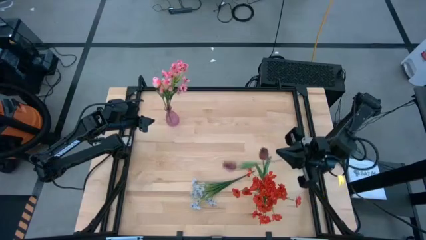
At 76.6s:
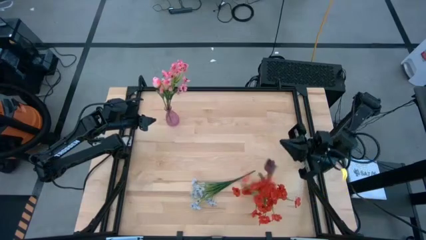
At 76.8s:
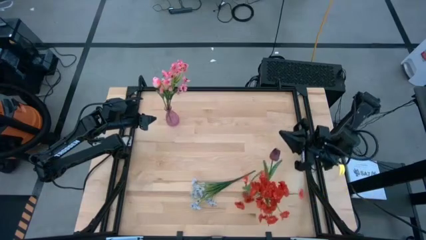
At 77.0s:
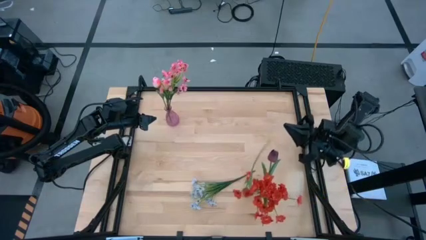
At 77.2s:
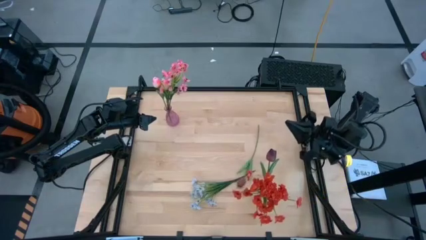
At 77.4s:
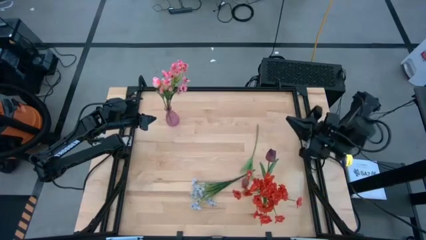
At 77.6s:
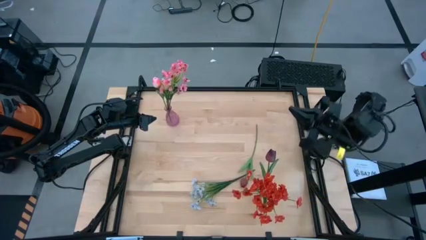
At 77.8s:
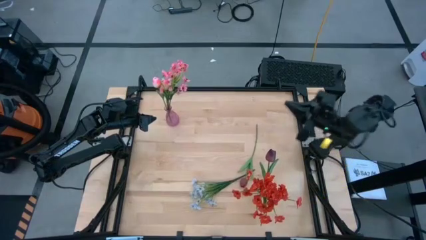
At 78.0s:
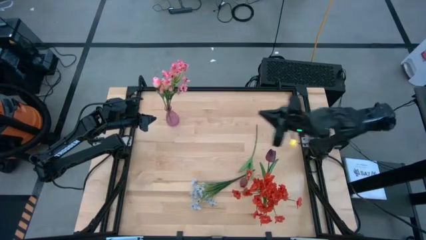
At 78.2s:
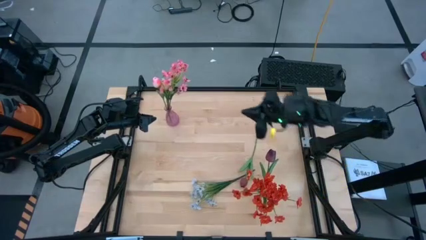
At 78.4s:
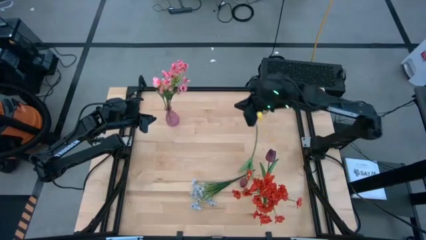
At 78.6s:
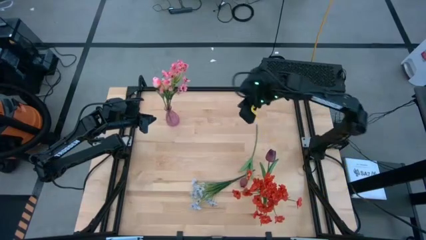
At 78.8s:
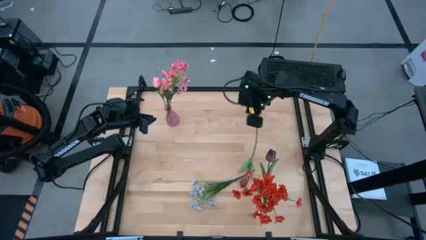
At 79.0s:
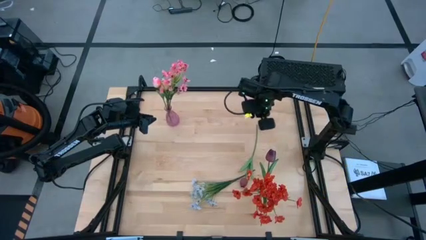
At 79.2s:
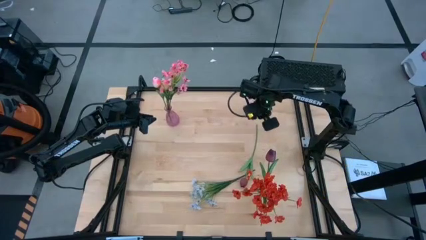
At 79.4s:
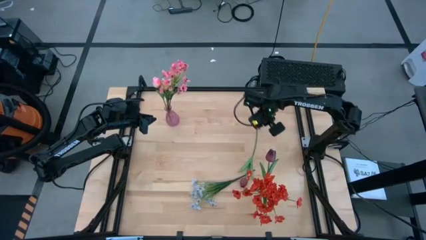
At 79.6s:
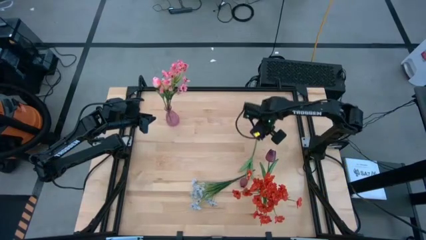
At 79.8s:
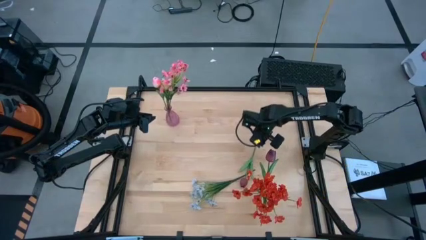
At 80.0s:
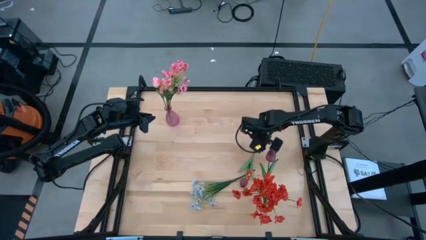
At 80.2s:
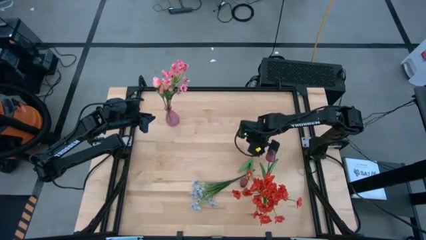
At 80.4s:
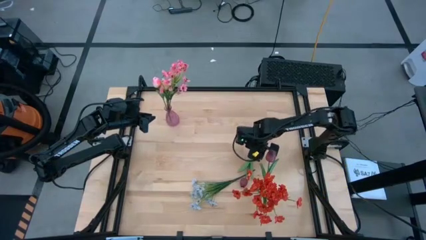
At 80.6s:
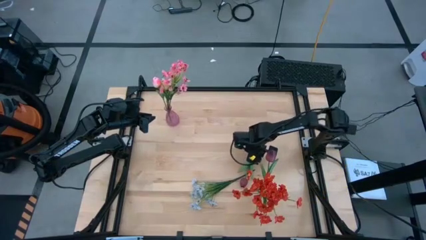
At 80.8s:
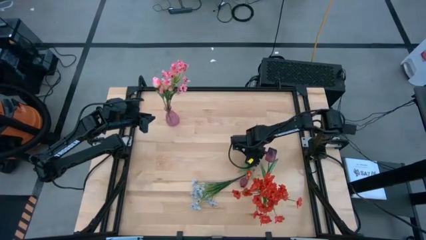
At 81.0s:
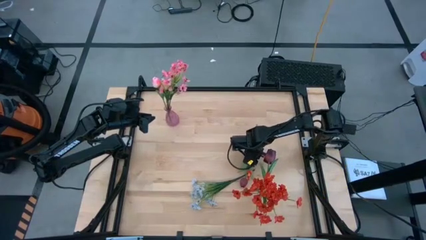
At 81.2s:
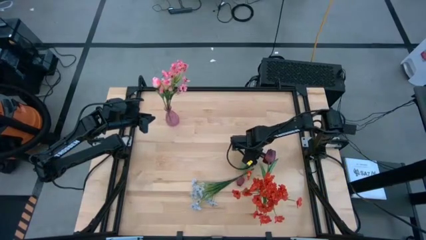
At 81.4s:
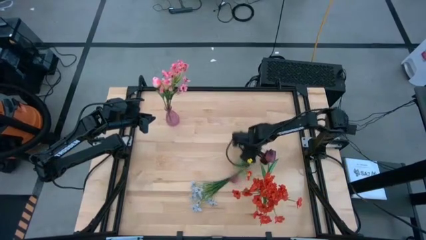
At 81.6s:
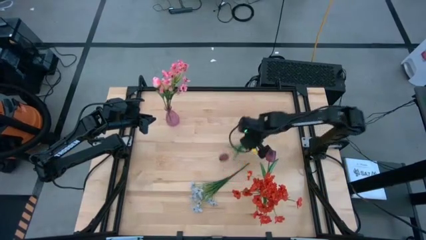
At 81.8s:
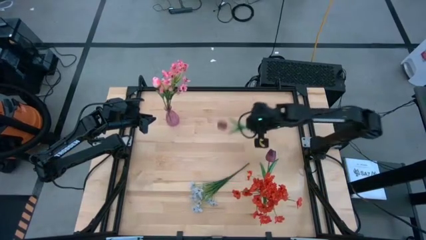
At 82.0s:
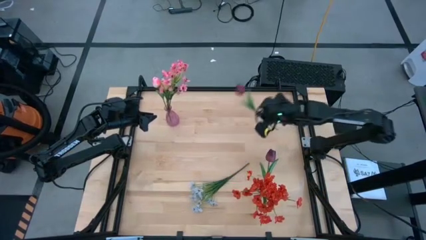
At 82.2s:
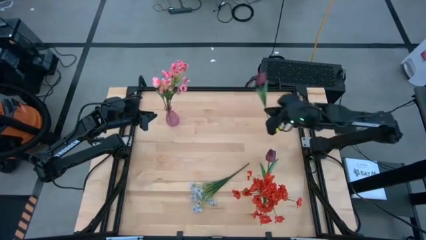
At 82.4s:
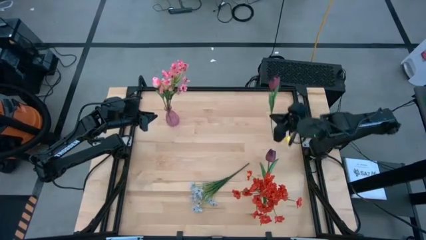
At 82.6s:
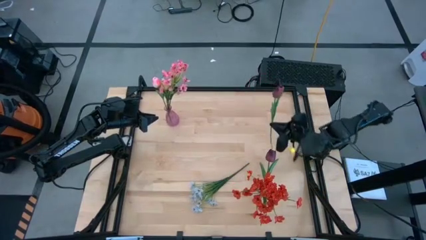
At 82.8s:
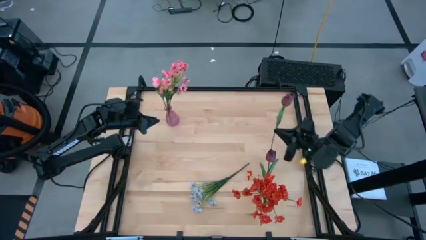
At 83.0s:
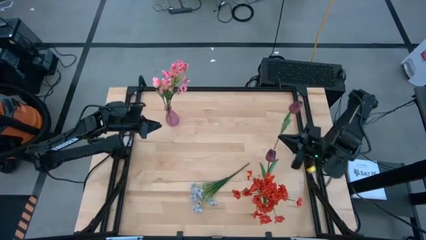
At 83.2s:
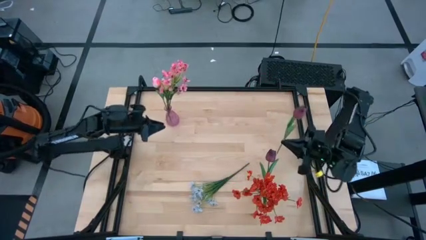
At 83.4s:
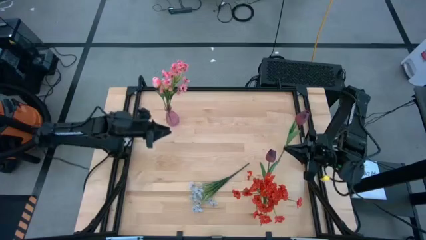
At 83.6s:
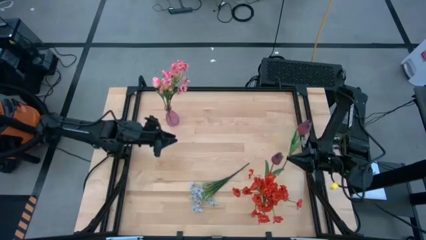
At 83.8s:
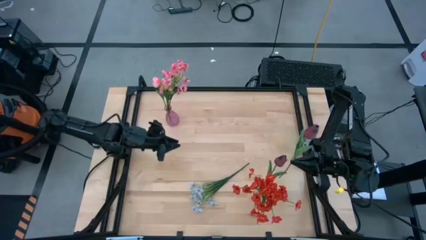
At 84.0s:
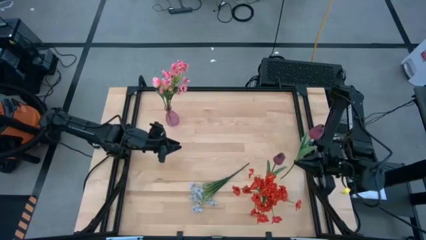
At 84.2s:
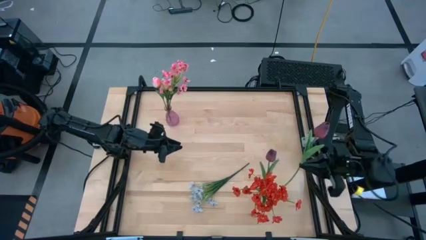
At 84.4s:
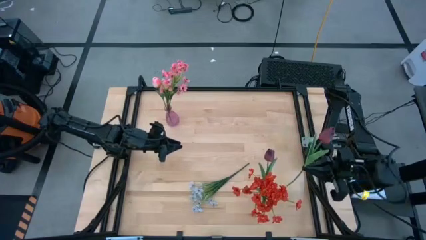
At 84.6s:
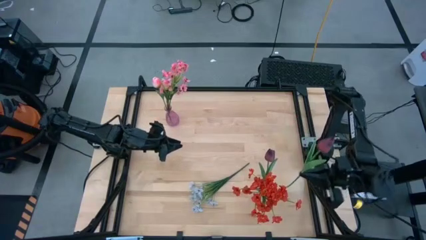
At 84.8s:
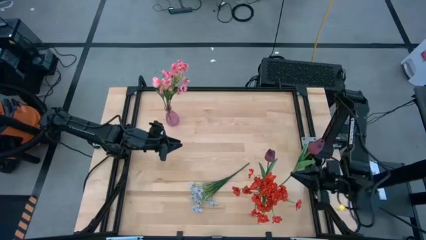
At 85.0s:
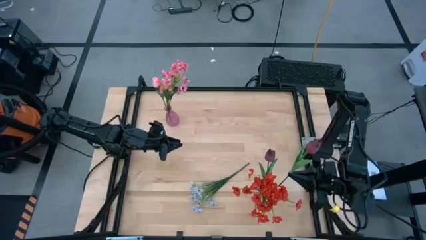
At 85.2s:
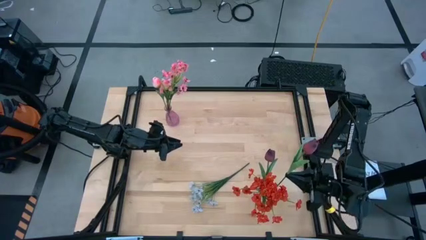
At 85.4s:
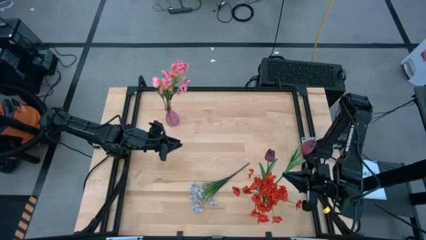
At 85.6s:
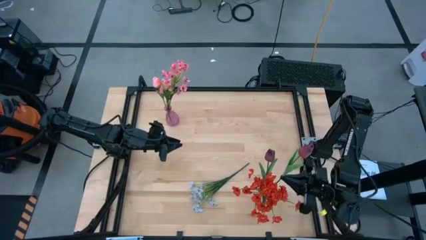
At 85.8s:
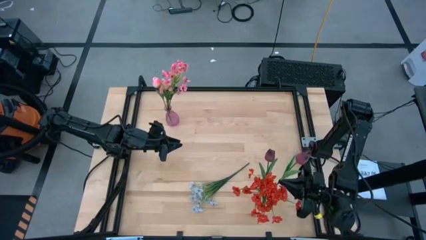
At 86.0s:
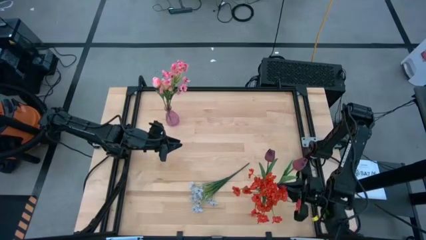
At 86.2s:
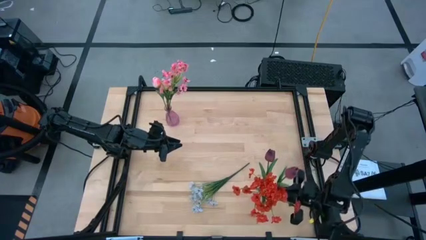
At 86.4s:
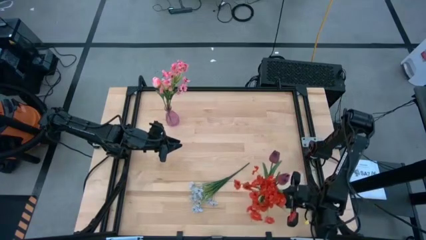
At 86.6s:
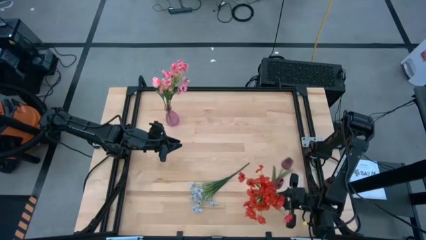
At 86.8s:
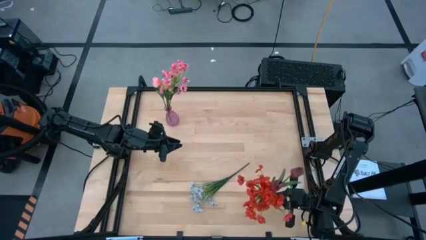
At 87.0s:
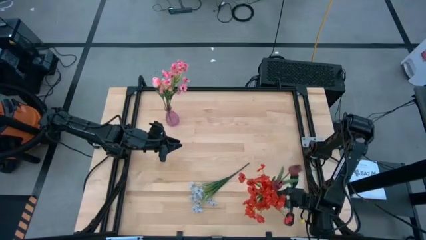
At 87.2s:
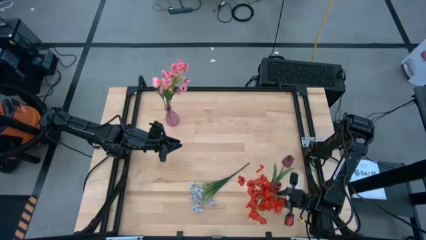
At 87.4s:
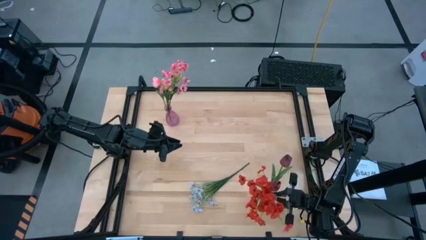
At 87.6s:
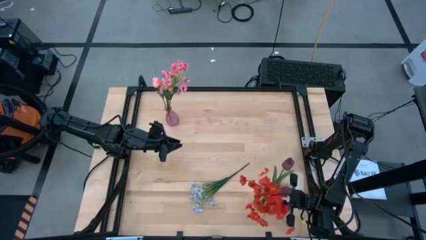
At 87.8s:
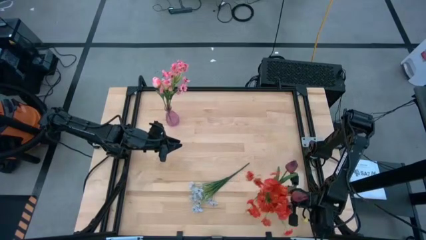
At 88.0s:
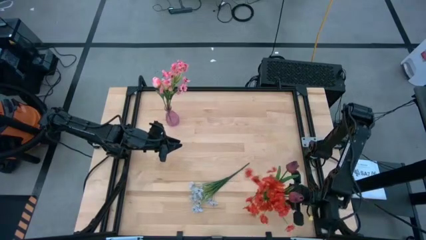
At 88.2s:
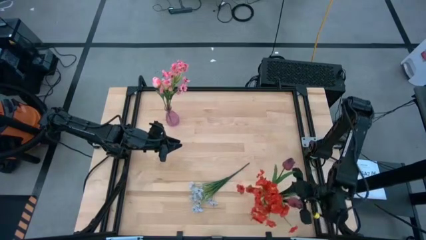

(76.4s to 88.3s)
Task: Sort flowers into vase by color
Put the red tulip into the transparent vase

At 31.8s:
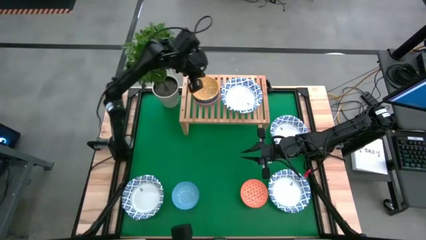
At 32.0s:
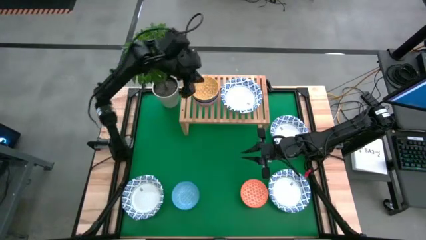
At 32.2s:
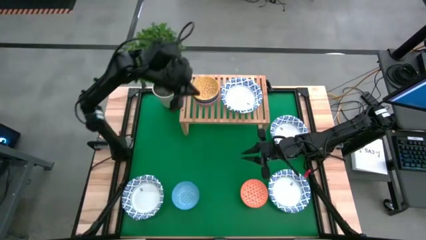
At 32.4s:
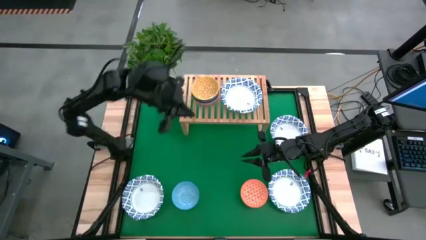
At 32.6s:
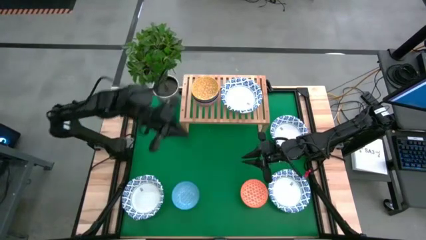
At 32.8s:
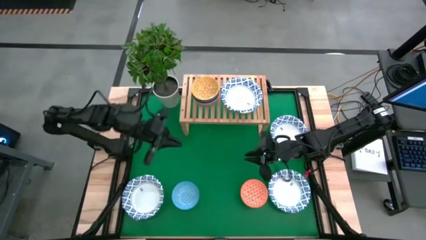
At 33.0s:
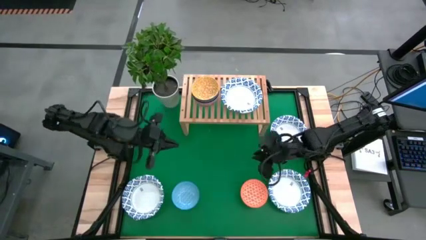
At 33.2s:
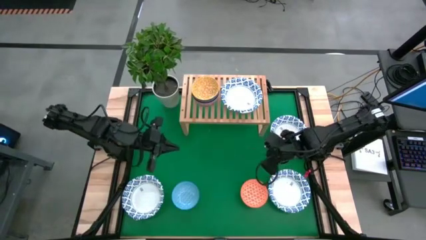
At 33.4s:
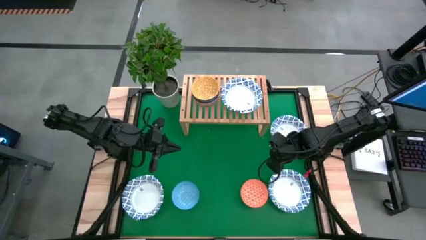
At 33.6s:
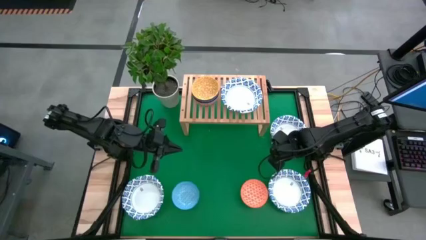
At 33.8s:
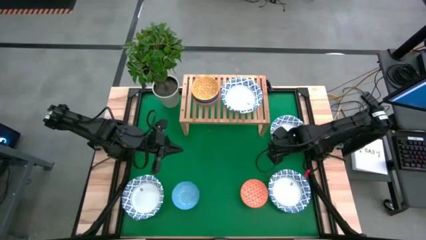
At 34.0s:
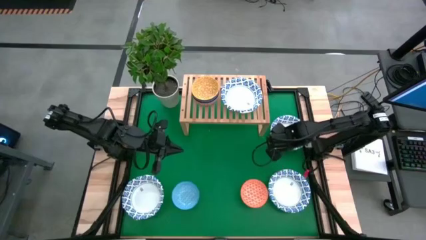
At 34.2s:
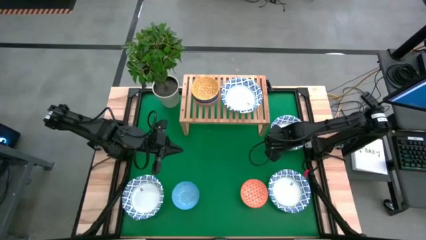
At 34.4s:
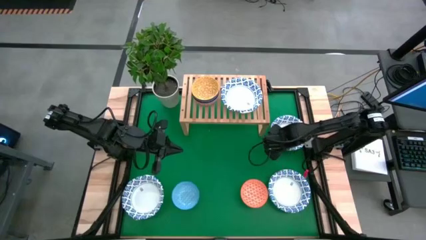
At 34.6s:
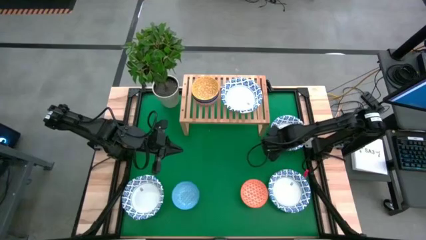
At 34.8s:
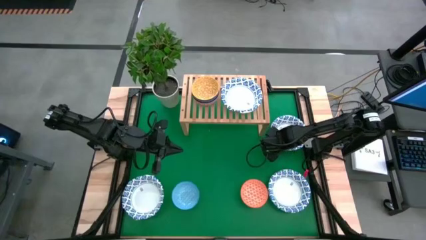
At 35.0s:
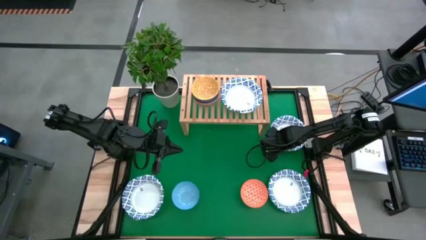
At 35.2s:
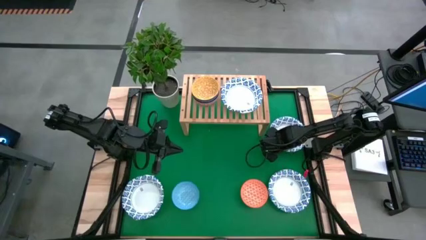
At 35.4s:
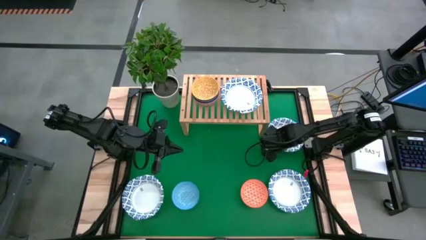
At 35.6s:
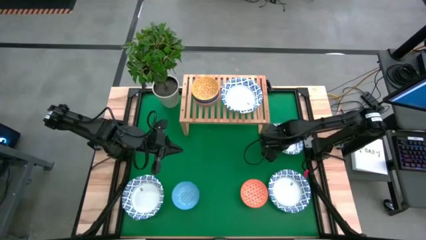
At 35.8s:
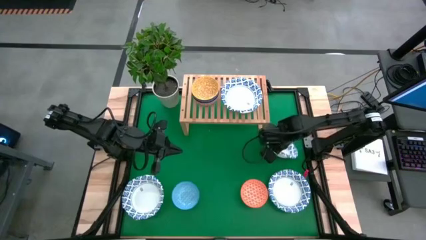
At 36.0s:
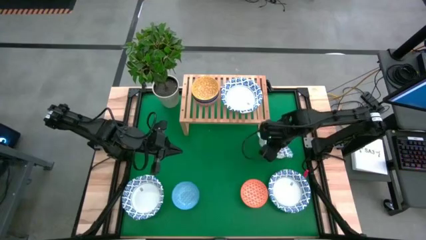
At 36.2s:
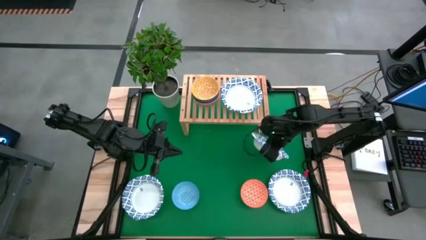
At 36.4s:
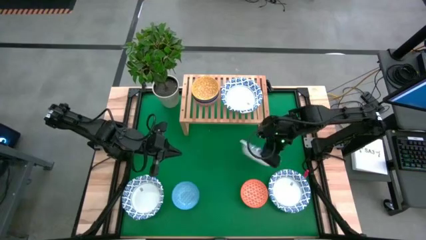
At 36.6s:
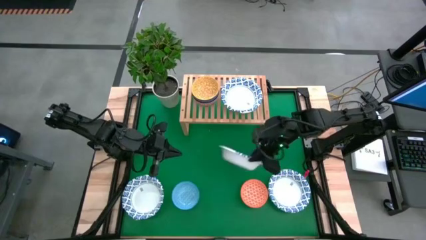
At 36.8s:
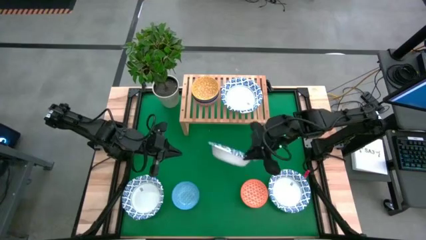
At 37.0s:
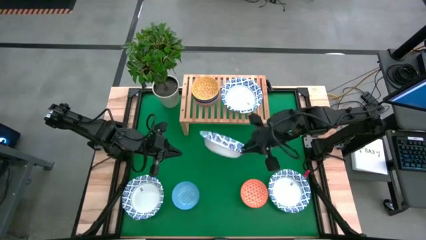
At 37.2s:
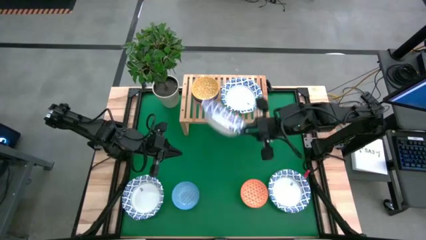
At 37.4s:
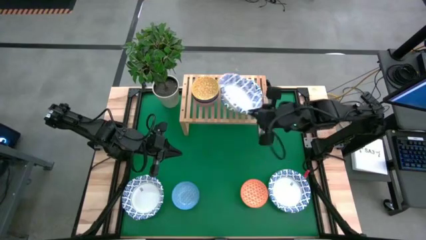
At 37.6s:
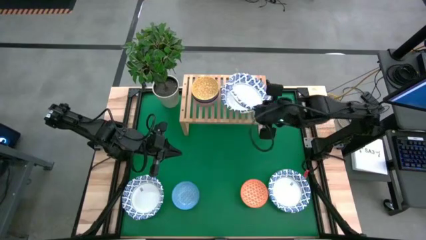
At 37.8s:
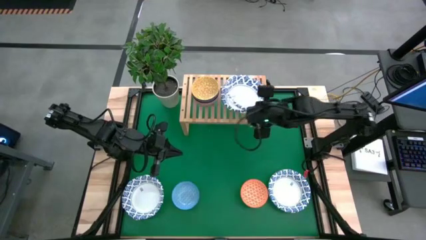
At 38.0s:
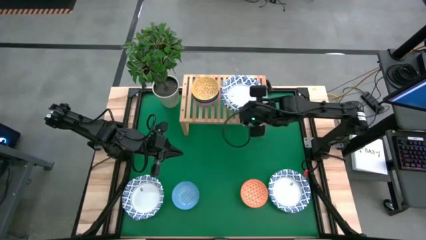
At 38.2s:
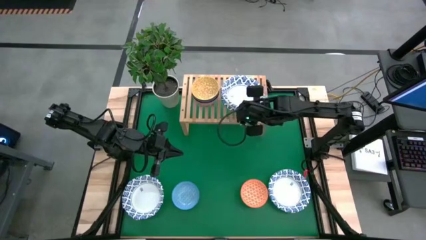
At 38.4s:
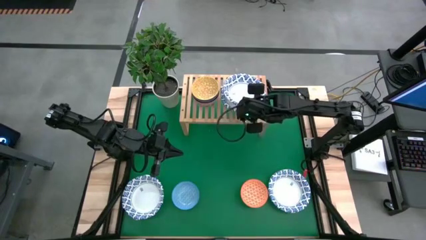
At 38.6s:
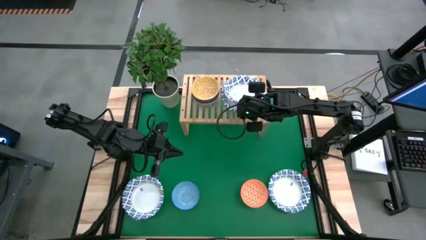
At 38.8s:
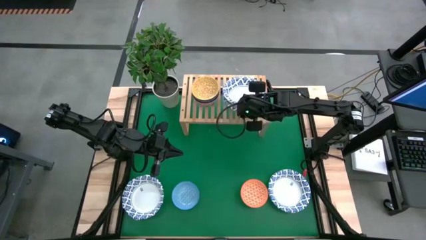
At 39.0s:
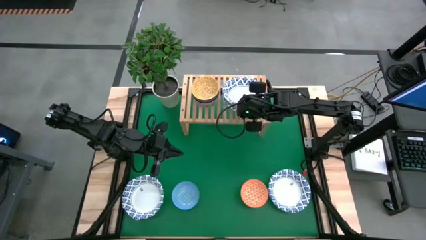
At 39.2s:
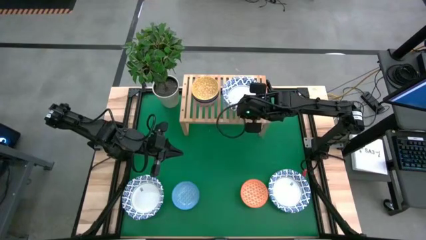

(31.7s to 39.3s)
Task: Place and stack bowls onto a shelf
Stack the white bowl on top of the white bowl on the shelf
